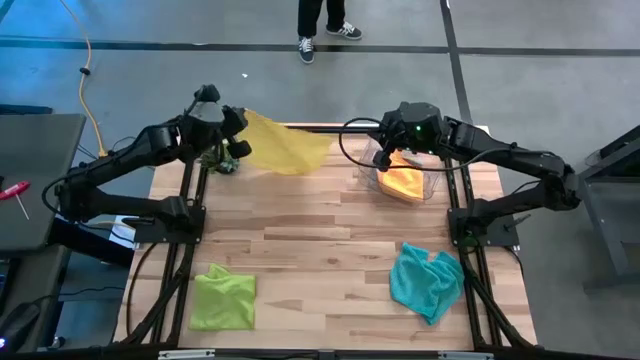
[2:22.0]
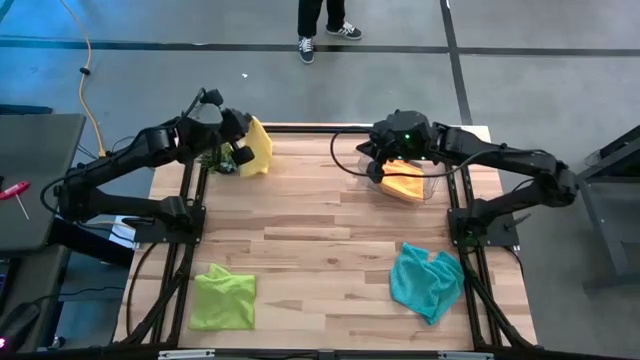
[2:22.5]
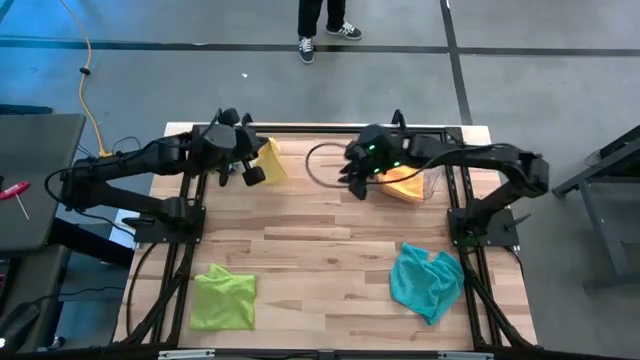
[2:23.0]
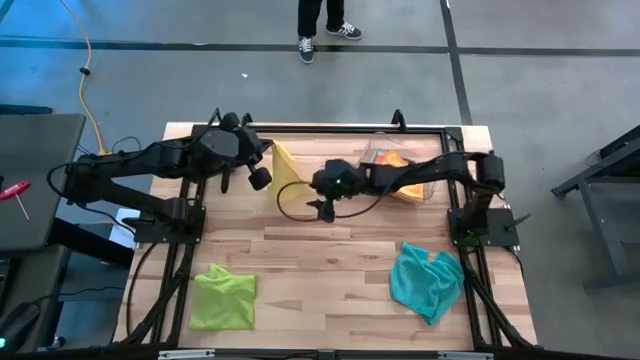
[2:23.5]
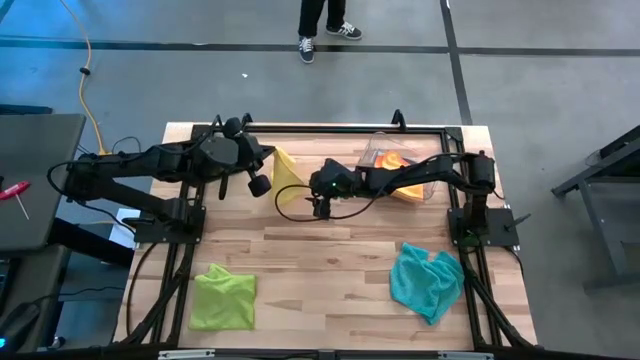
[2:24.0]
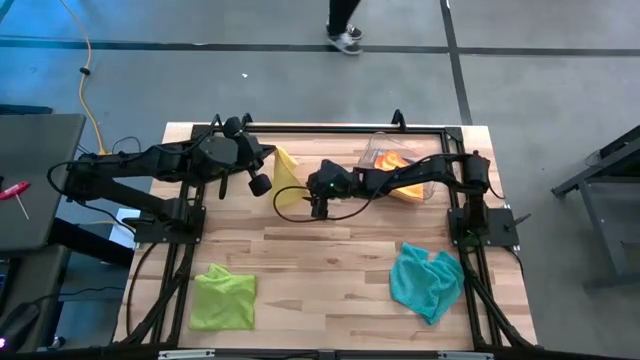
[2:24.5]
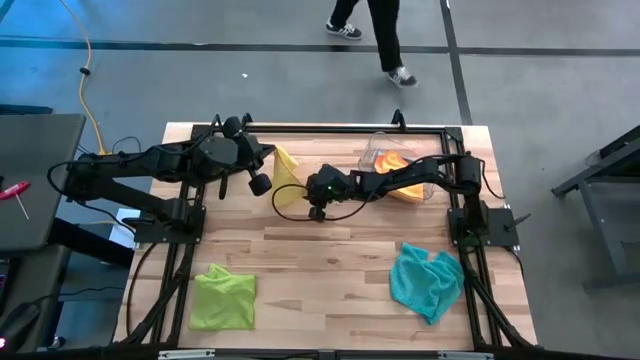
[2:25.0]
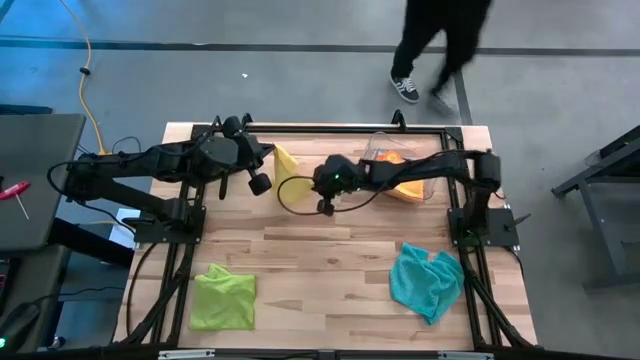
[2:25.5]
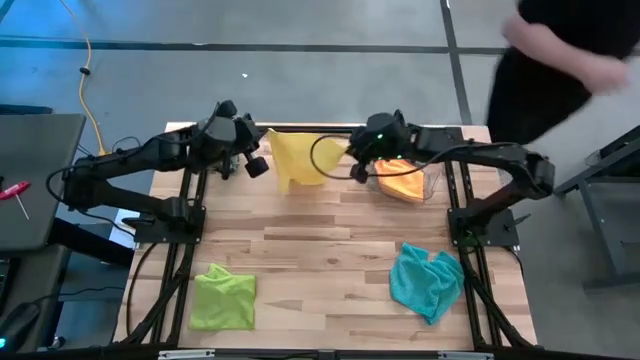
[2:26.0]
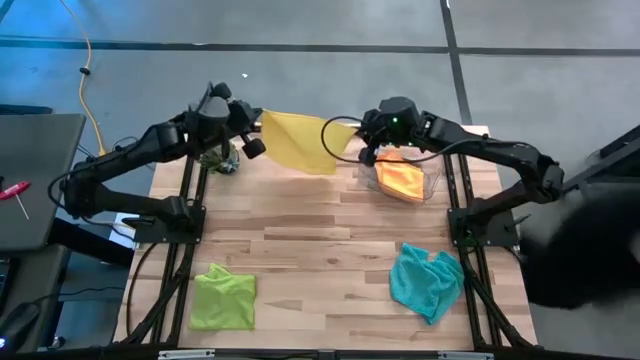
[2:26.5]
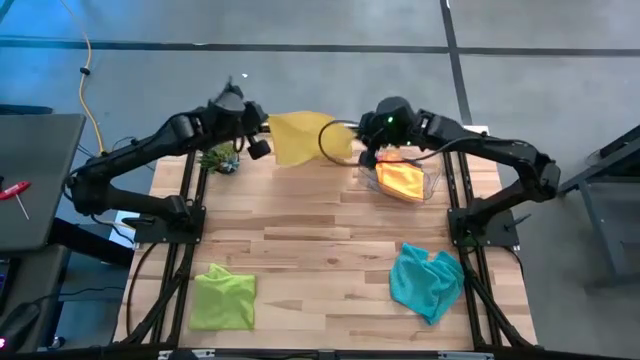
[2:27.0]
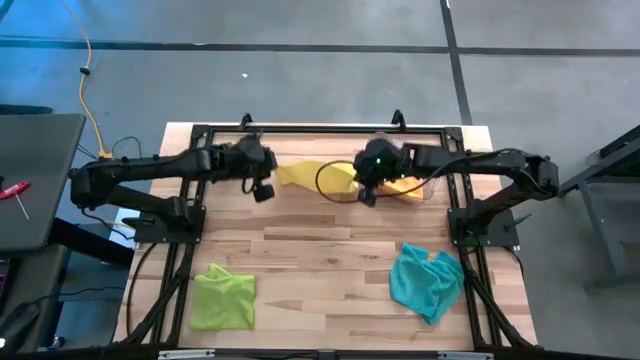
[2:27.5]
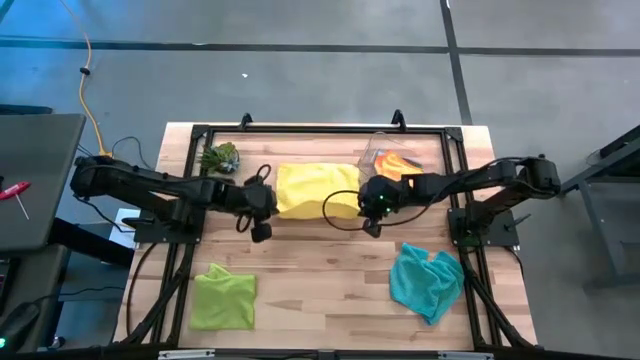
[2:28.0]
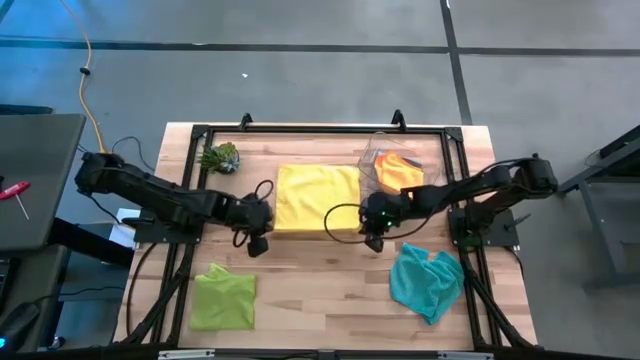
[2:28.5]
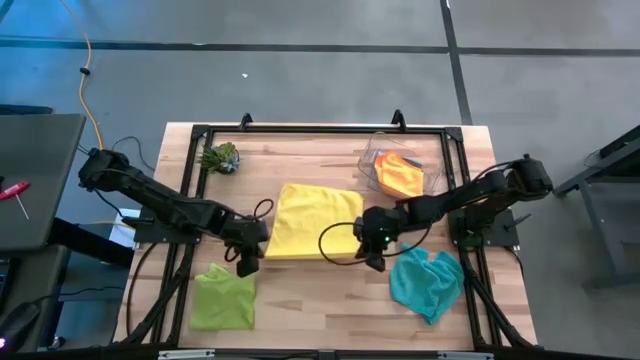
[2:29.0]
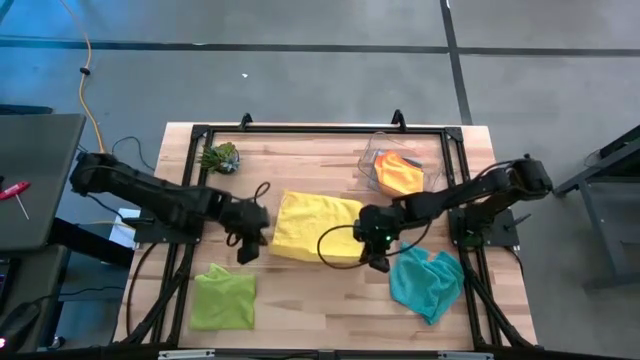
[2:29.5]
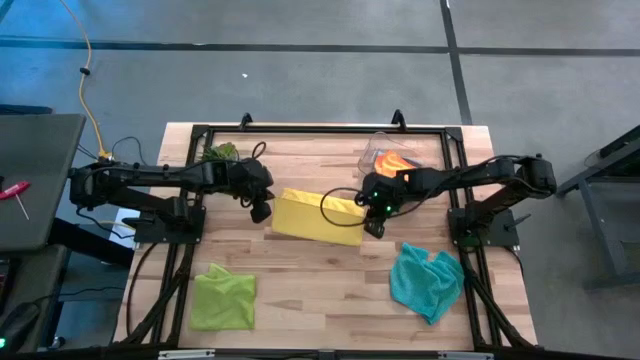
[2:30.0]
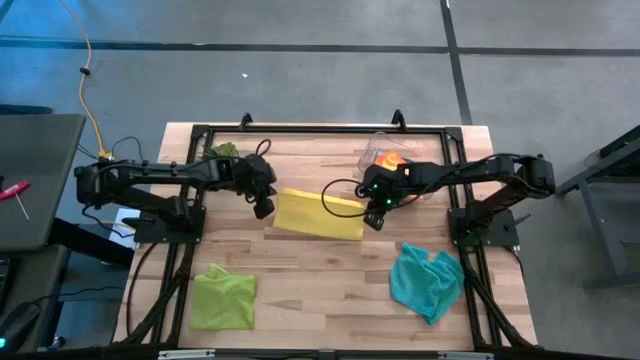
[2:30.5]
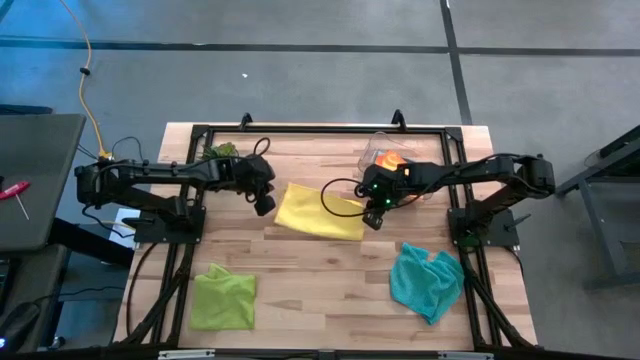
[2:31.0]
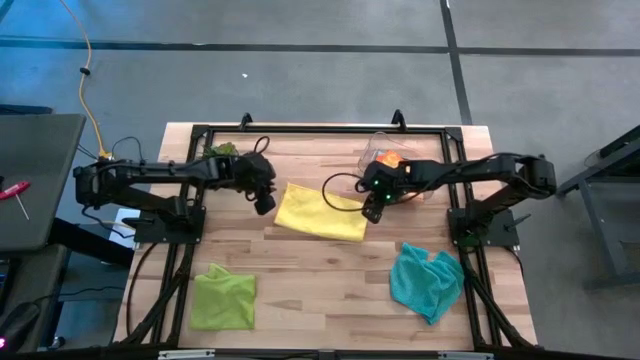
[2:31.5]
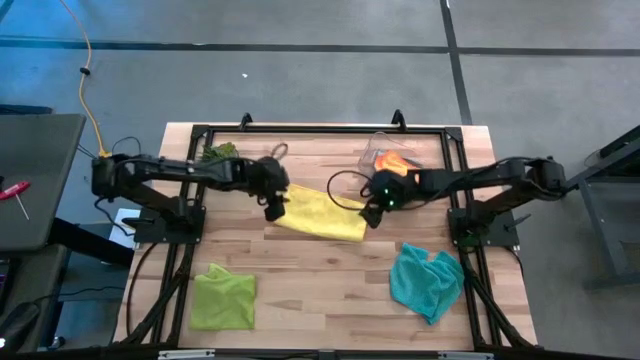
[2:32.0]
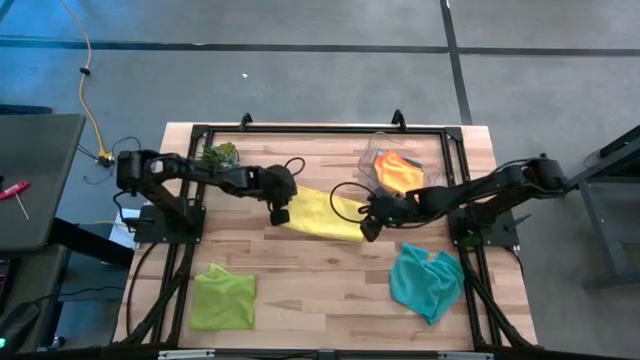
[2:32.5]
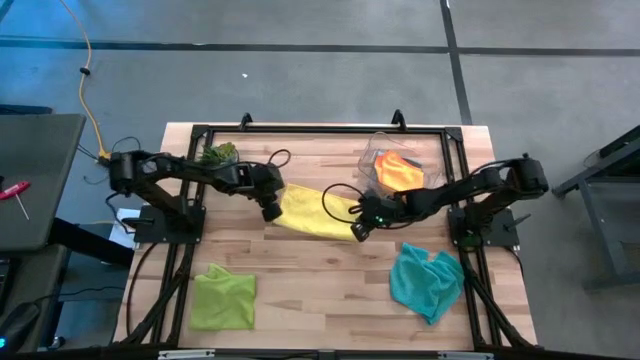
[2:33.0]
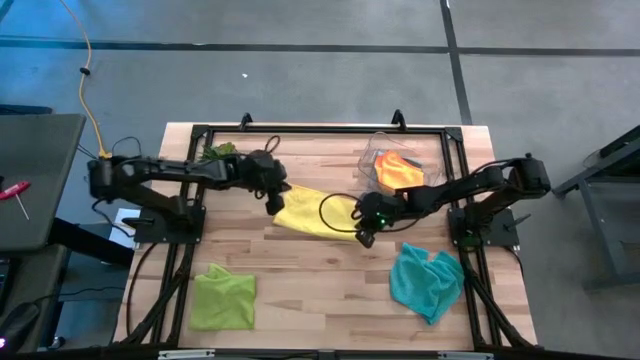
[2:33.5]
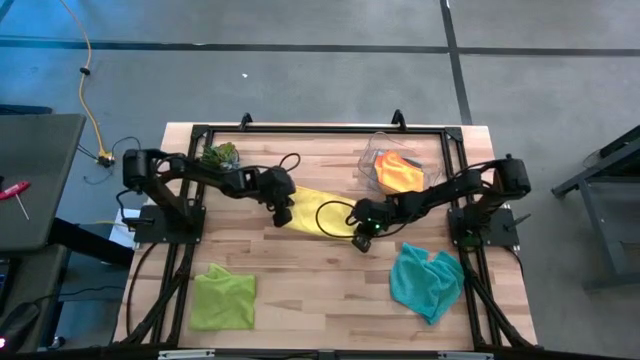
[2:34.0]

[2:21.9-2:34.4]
Task: Fold microfiber towels
Fold the yellow microfiber towel

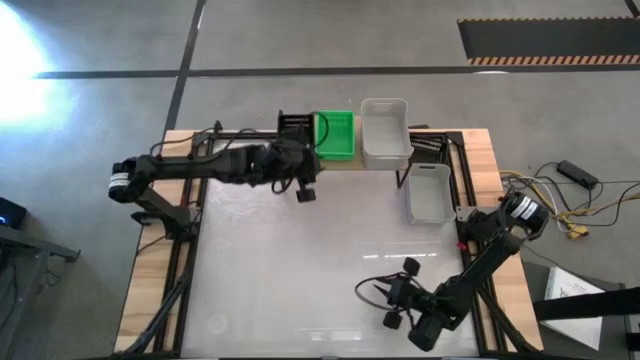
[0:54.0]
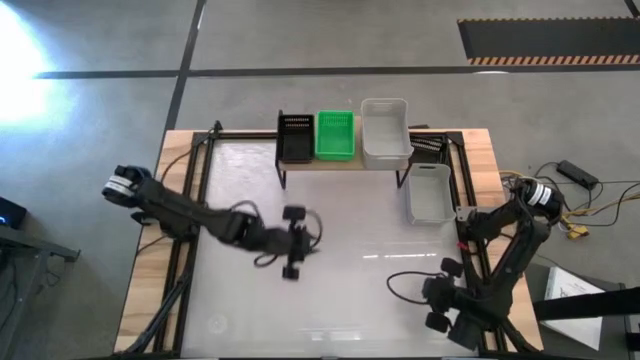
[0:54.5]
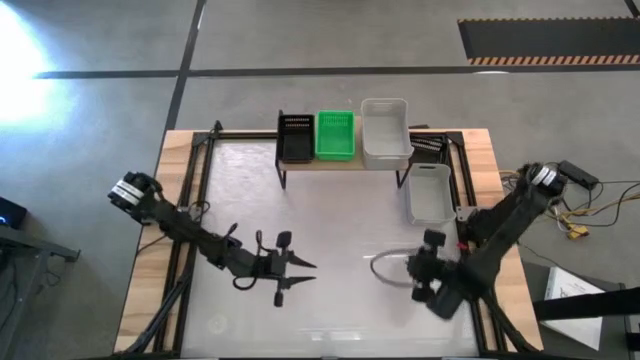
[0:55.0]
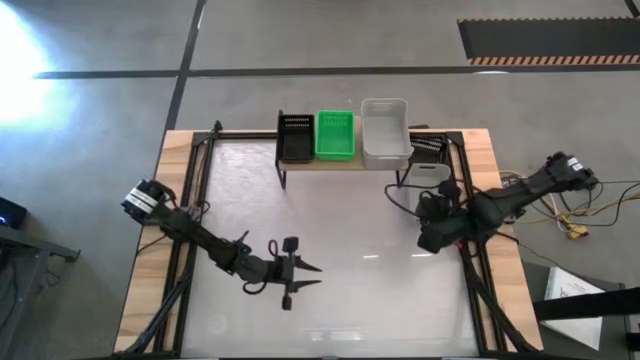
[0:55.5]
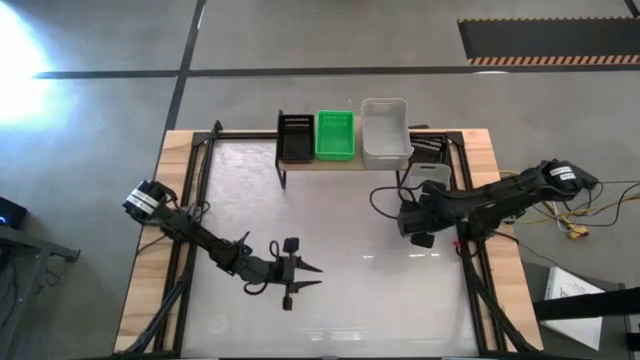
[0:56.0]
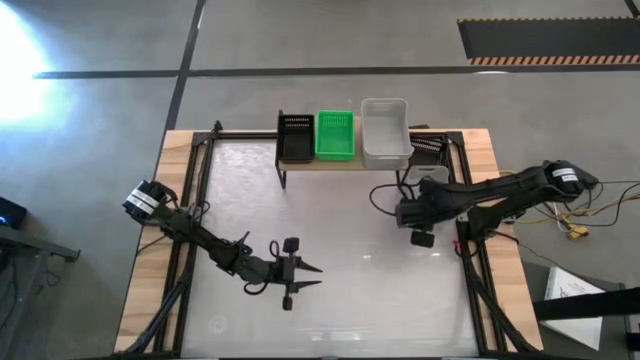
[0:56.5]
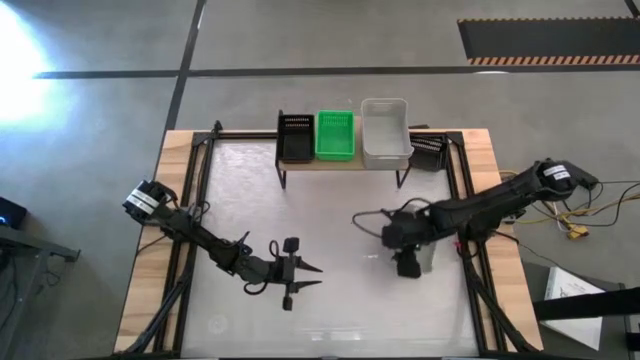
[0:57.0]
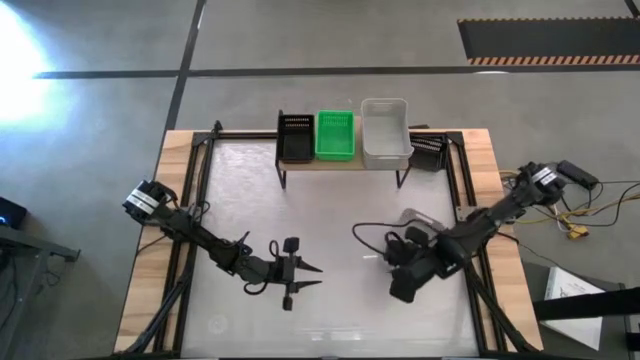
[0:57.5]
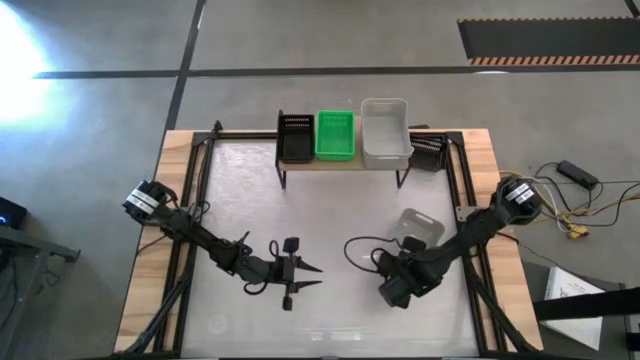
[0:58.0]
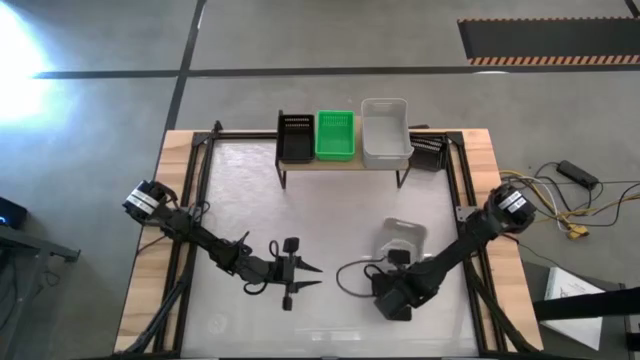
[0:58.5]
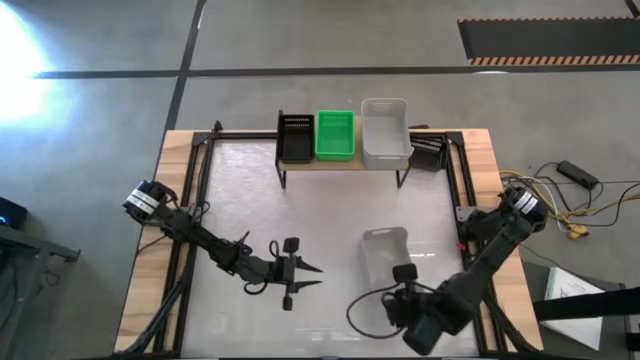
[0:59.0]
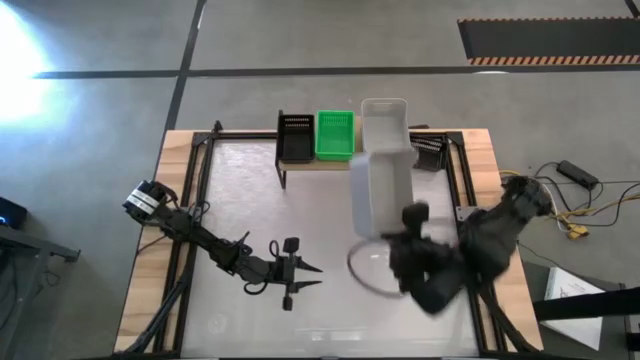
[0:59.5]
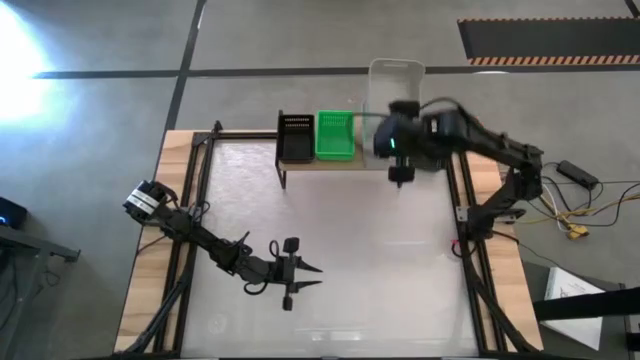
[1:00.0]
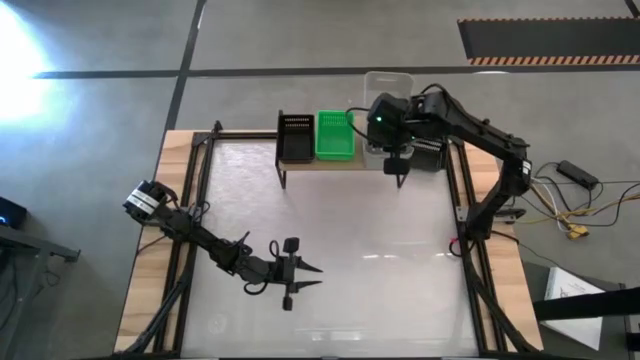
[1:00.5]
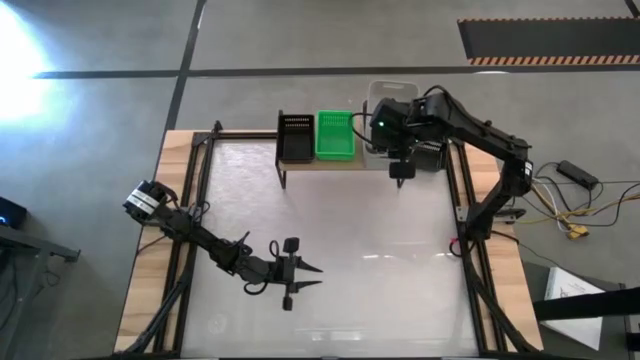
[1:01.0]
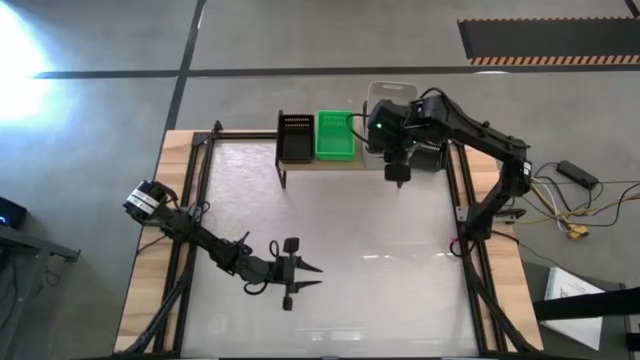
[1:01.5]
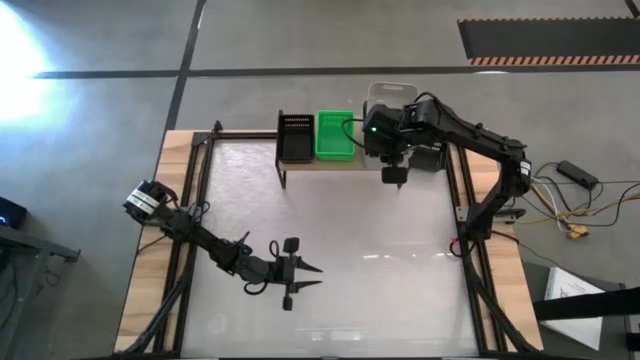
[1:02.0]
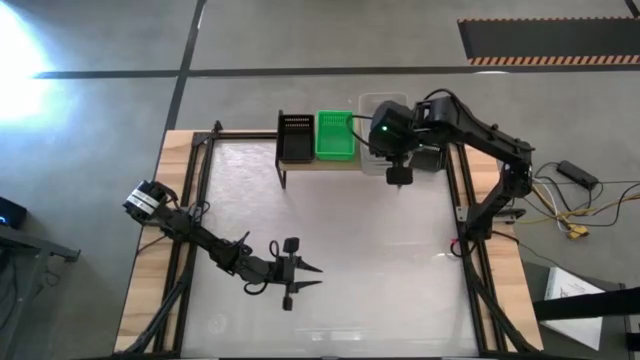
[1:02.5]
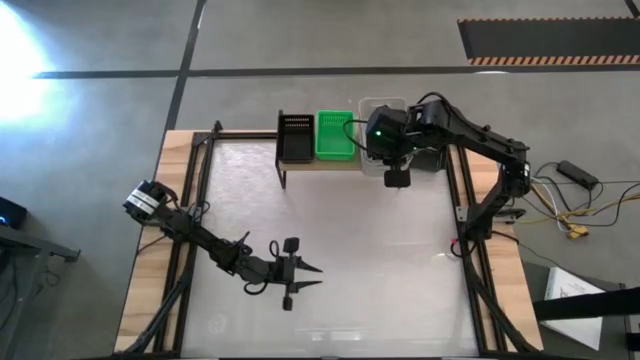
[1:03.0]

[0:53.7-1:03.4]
Task: Stack baskets on shelf by color
Stack the white bin on top of the white bin on the shelf
